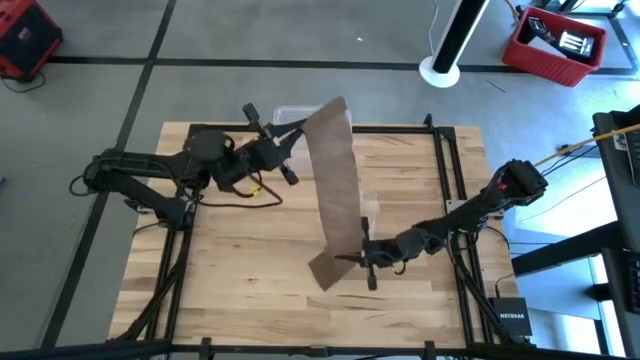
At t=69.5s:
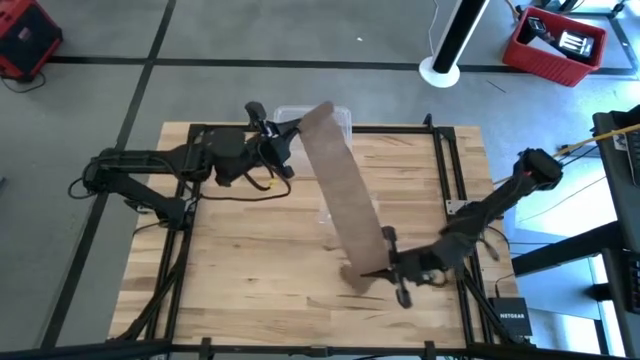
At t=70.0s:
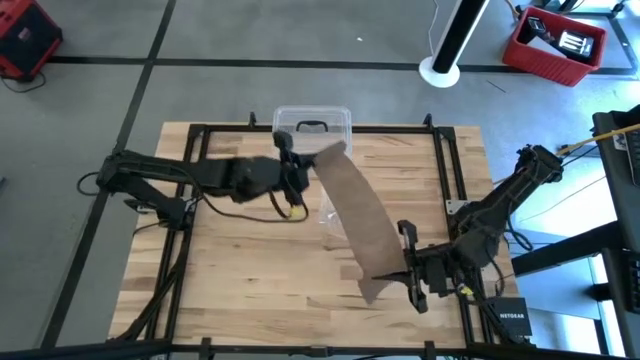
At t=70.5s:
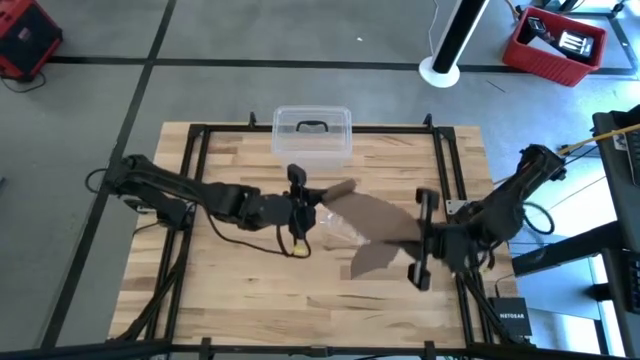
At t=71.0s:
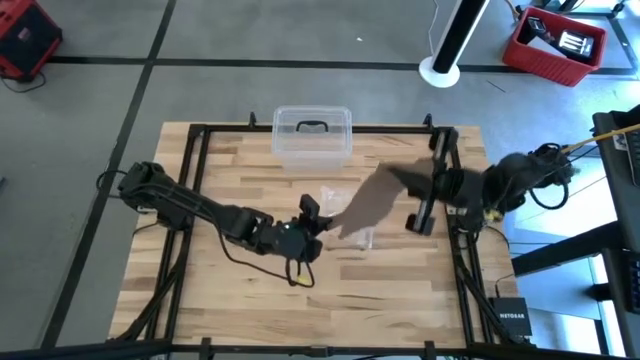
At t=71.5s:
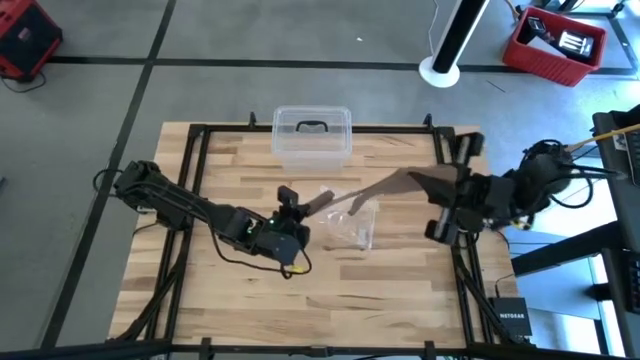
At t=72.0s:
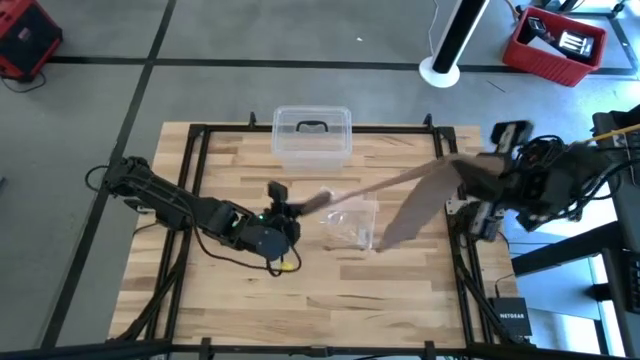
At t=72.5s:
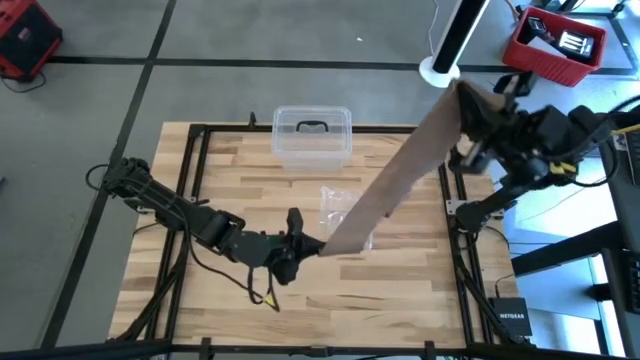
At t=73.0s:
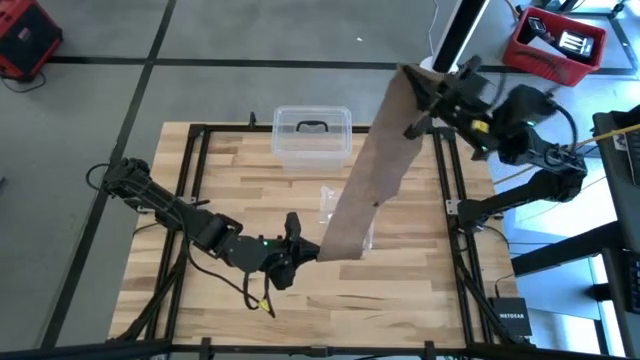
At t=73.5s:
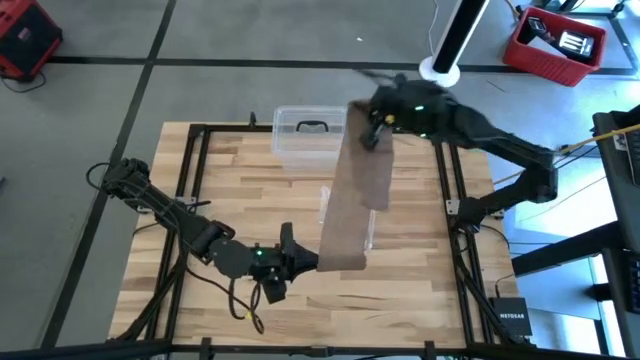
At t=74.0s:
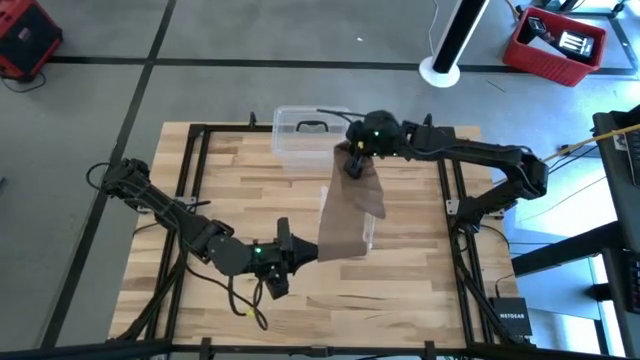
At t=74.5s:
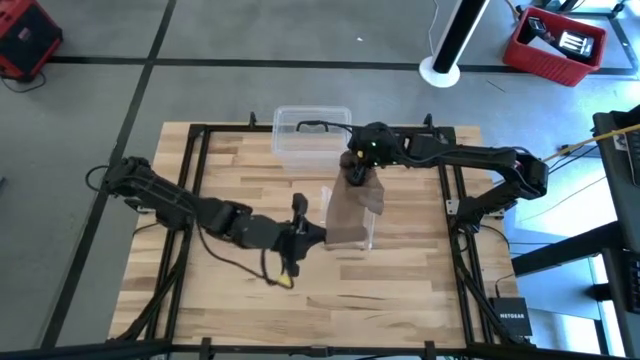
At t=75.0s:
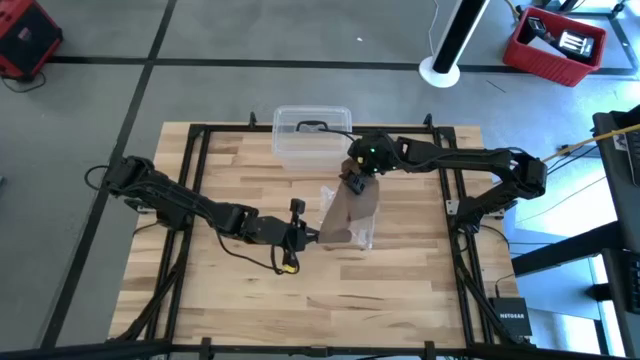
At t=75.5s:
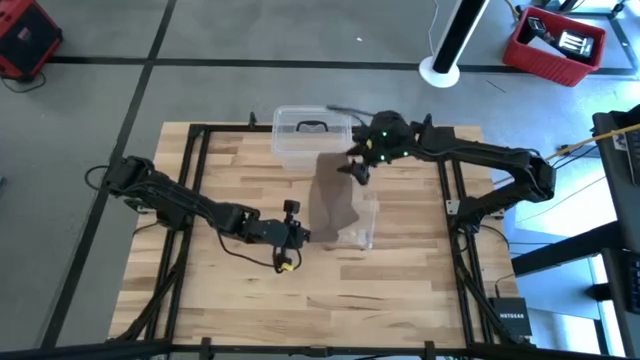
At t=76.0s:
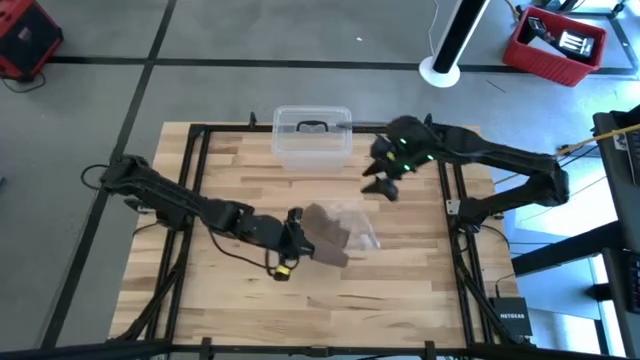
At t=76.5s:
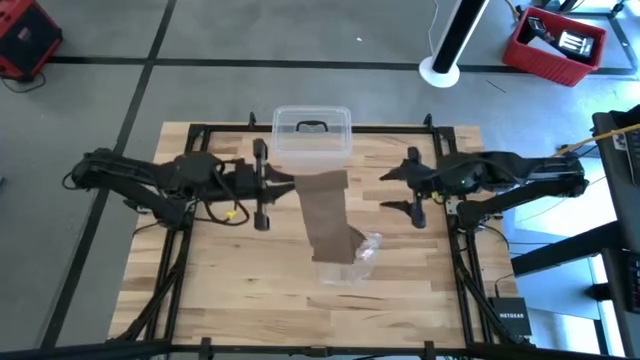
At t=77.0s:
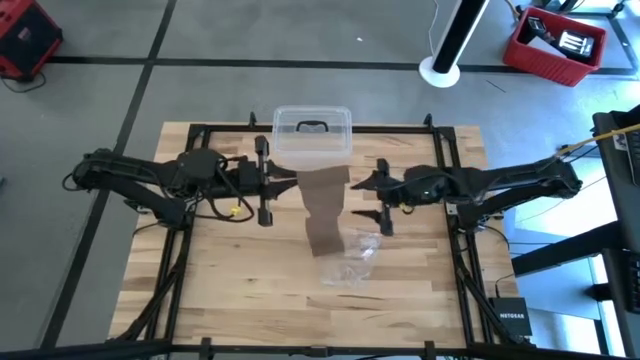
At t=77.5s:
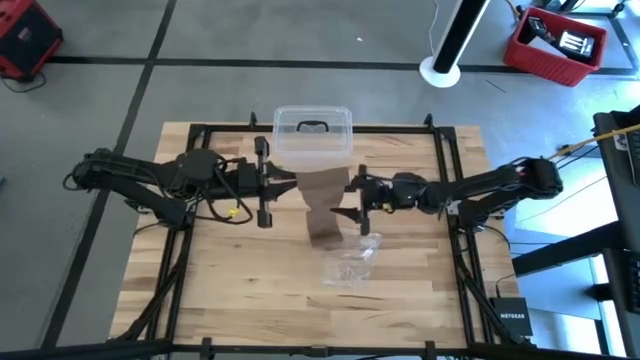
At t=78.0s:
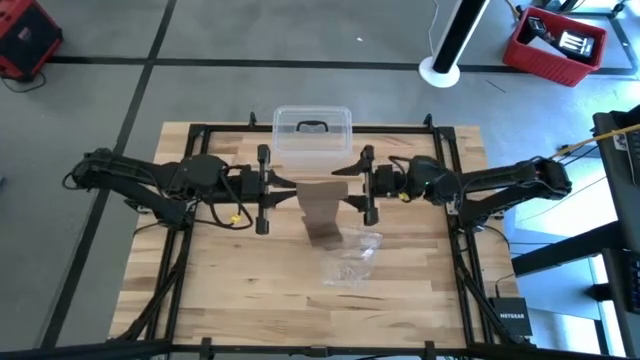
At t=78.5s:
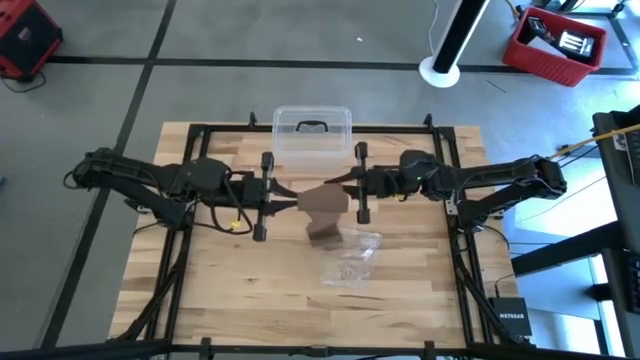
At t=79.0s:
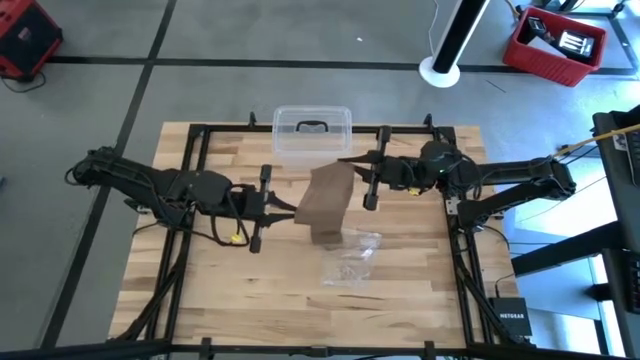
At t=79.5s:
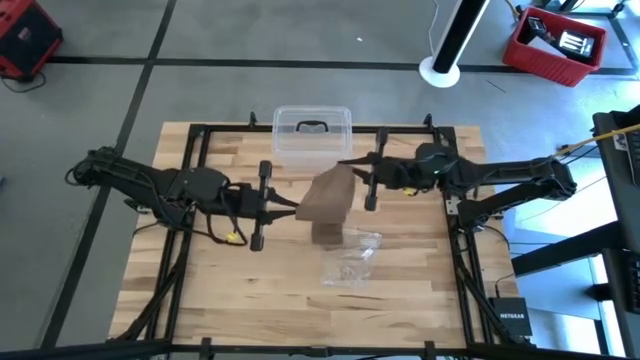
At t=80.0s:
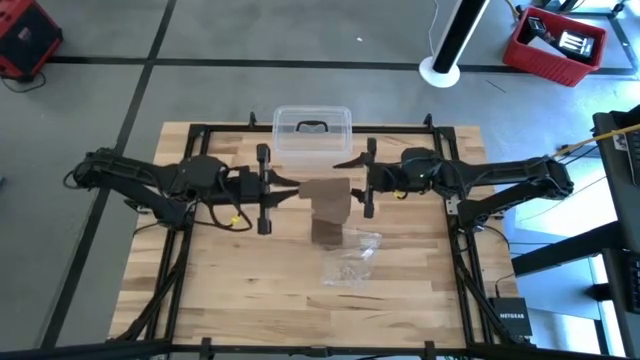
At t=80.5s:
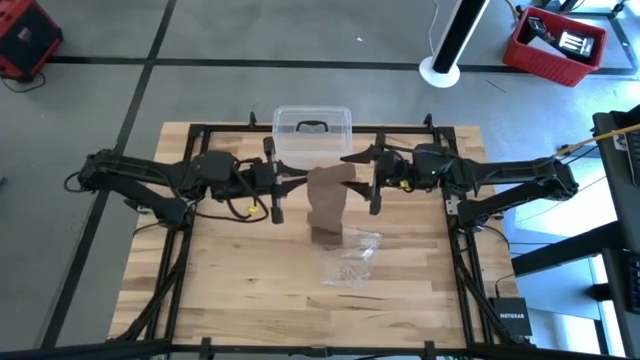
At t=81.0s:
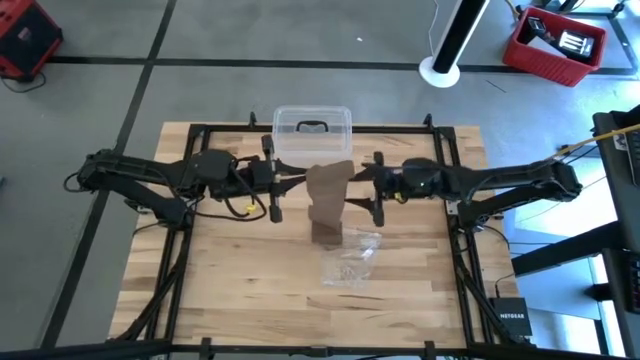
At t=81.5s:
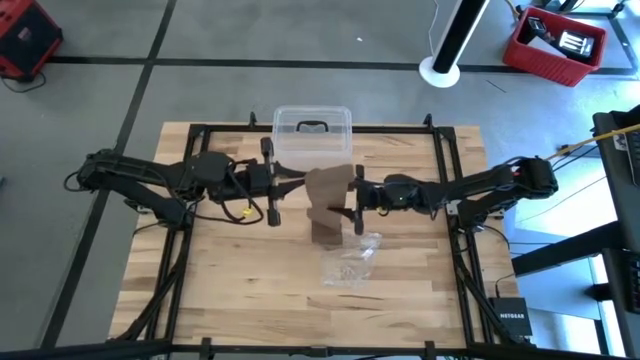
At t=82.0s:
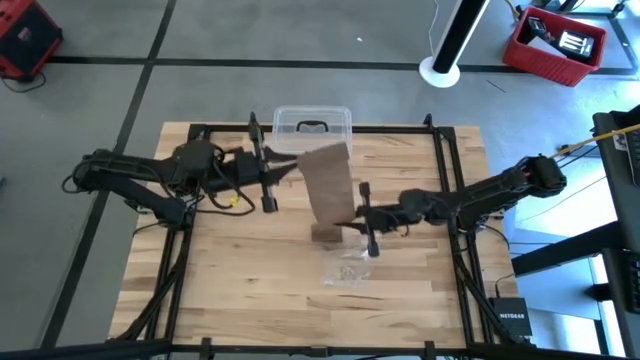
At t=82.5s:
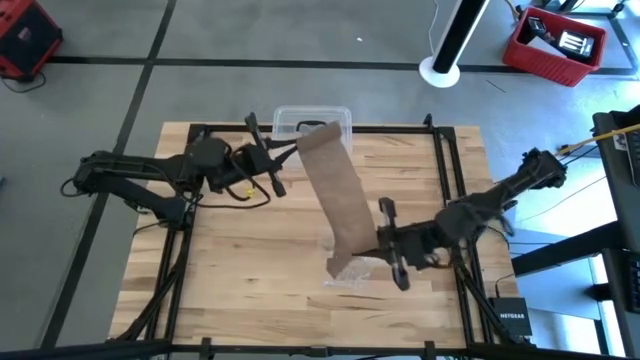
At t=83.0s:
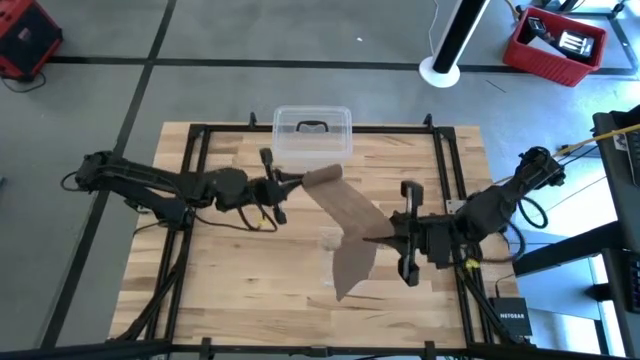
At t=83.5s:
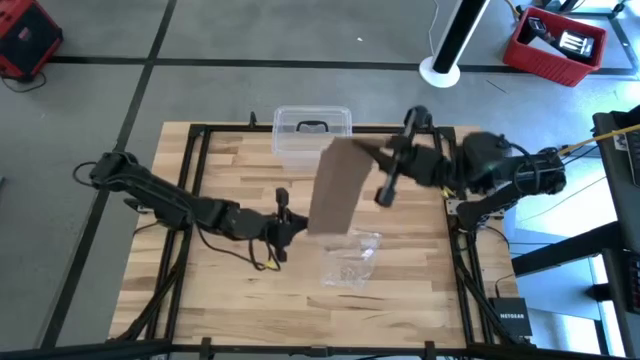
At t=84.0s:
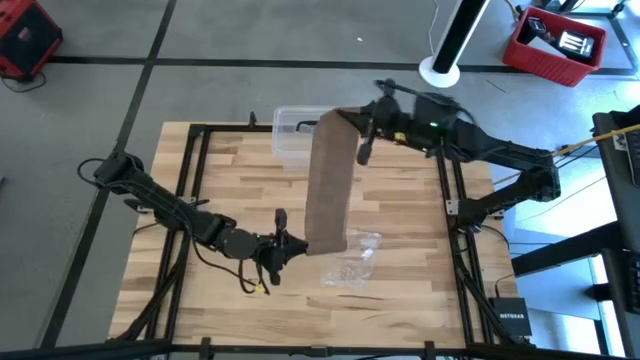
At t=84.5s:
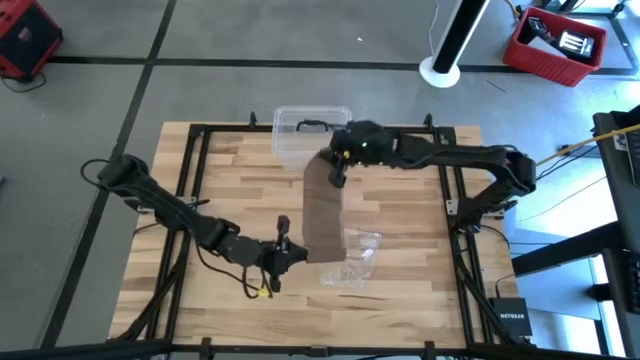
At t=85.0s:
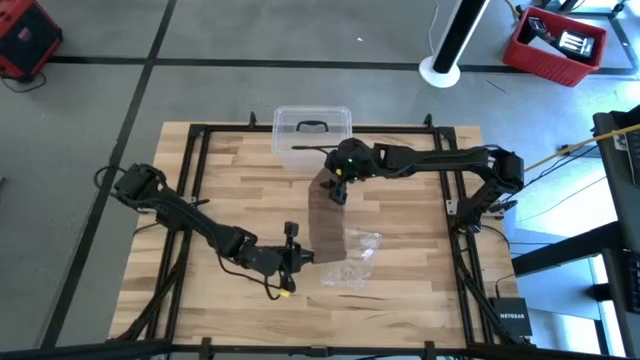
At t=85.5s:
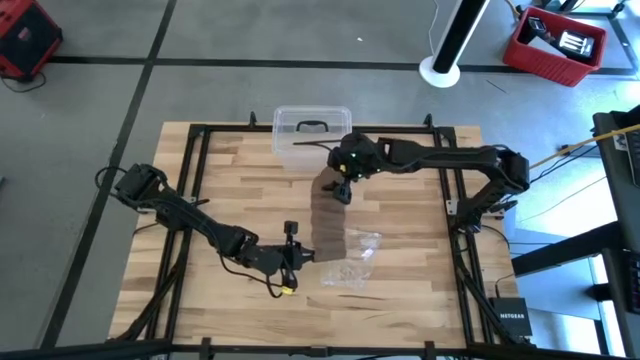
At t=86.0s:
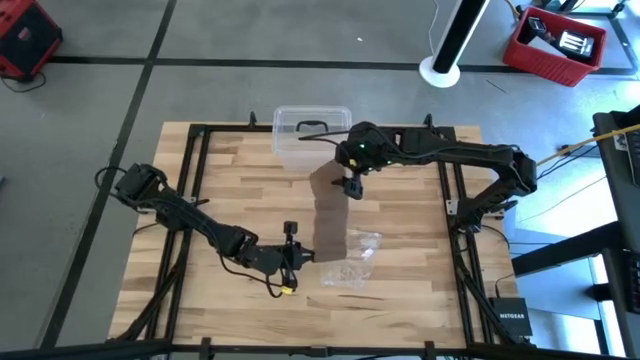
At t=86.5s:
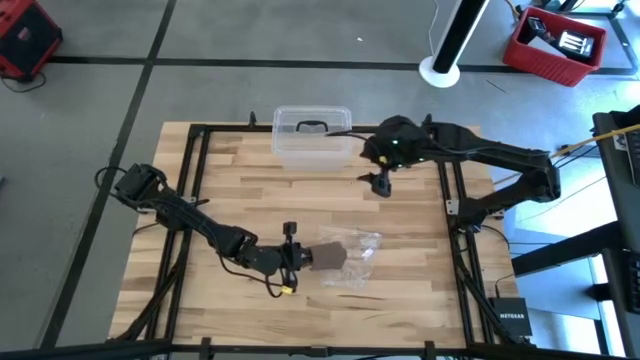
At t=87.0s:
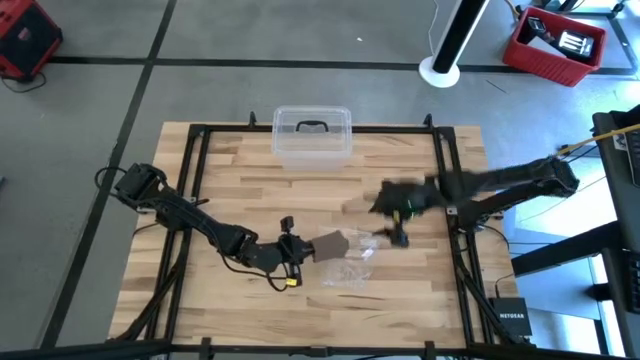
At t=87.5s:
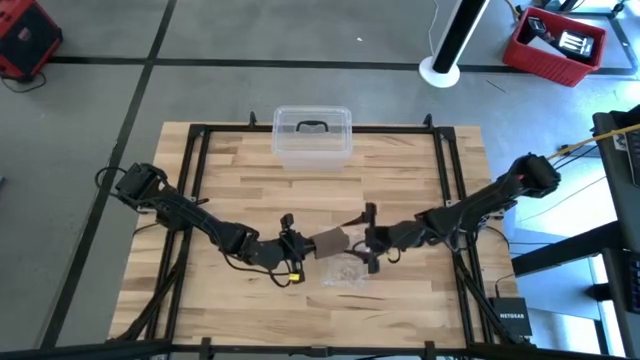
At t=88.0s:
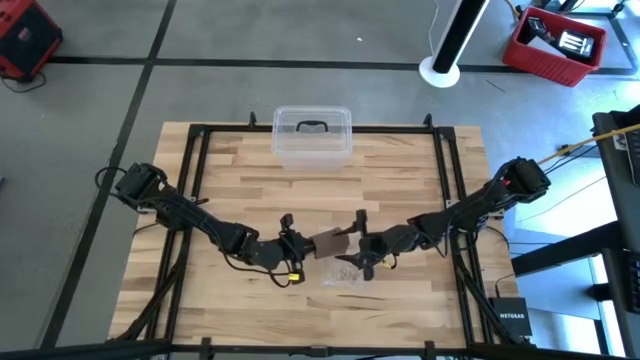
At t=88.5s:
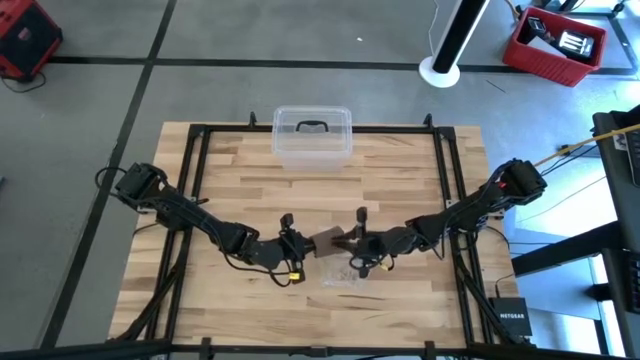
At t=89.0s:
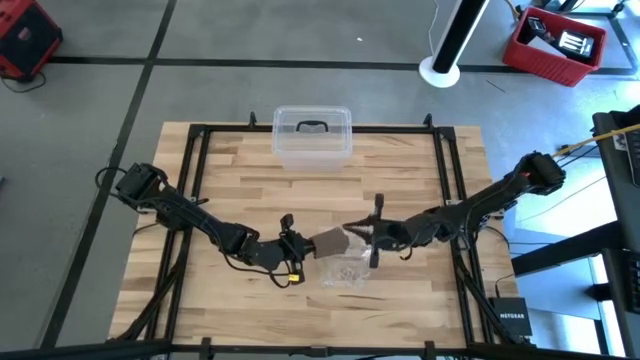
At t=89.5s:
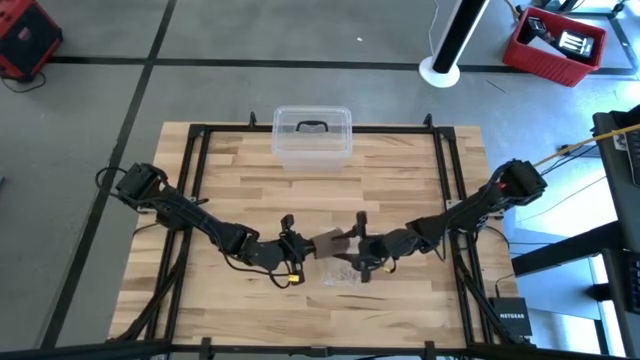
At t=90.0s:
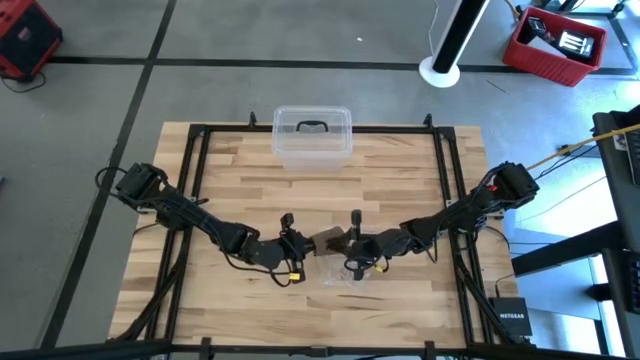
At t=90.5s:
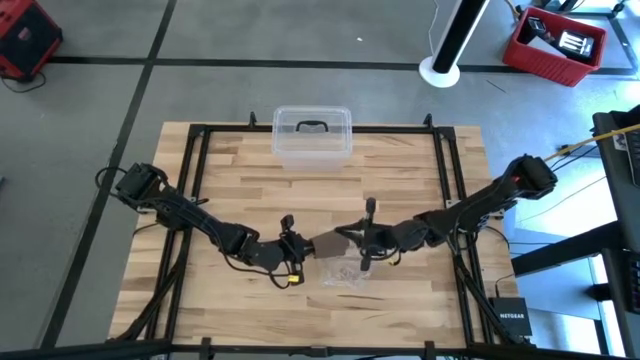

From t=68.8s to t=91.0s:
Task: Roll bandage
Roll the brown bandage
